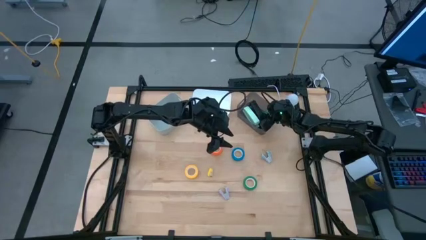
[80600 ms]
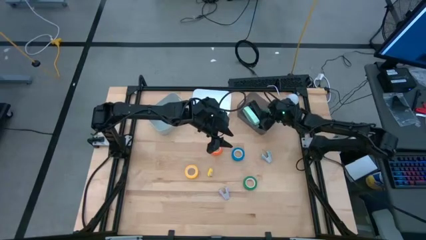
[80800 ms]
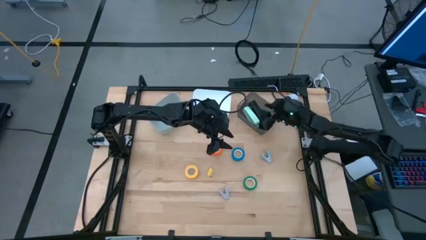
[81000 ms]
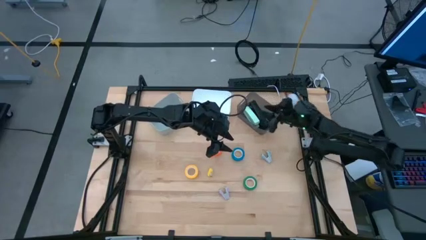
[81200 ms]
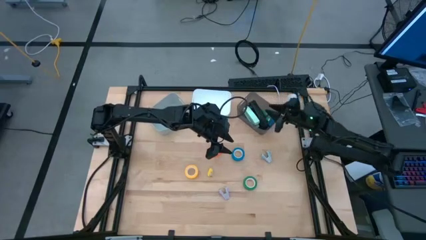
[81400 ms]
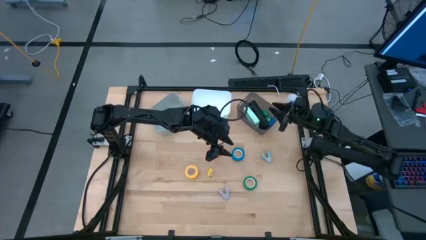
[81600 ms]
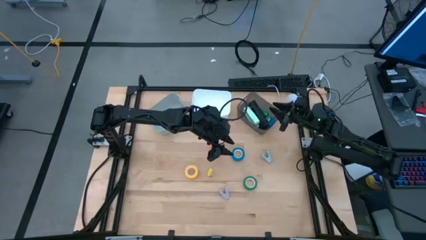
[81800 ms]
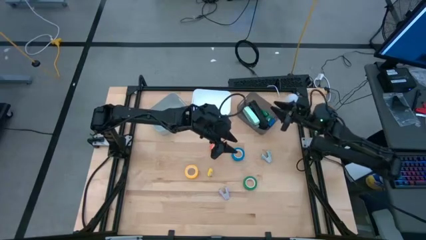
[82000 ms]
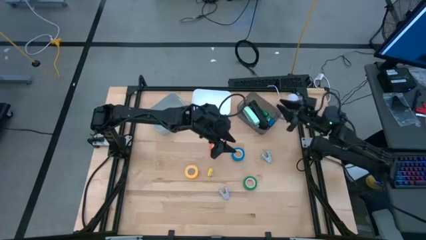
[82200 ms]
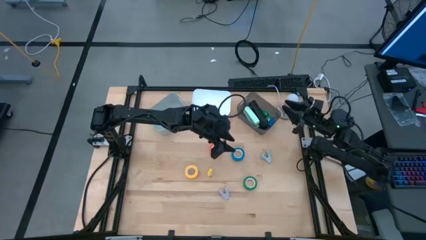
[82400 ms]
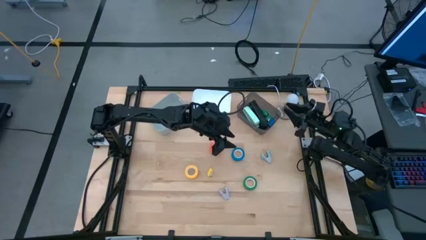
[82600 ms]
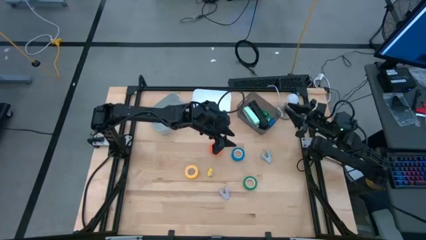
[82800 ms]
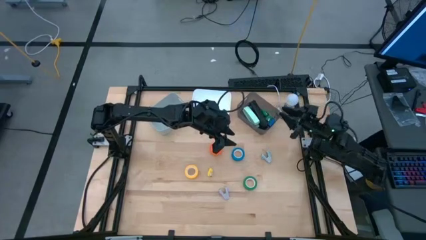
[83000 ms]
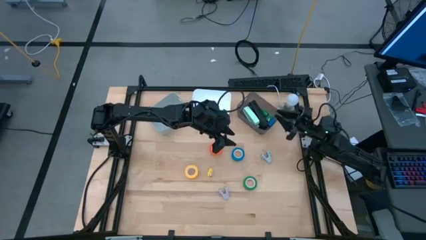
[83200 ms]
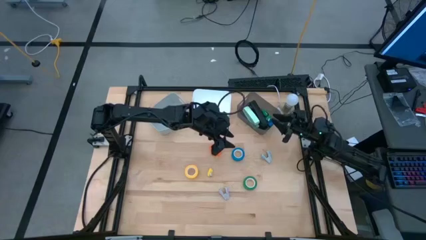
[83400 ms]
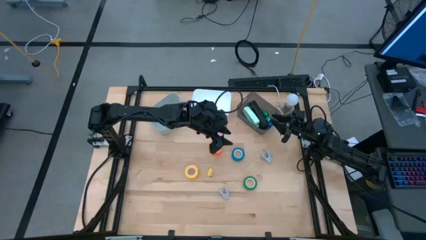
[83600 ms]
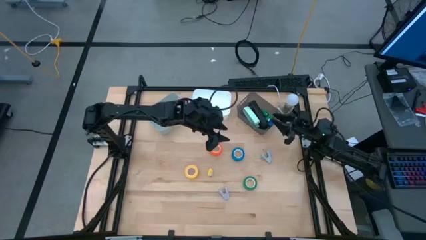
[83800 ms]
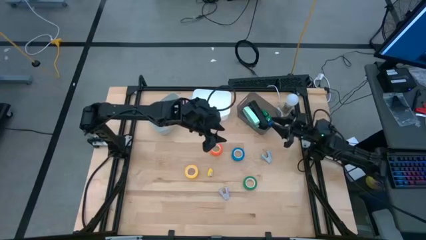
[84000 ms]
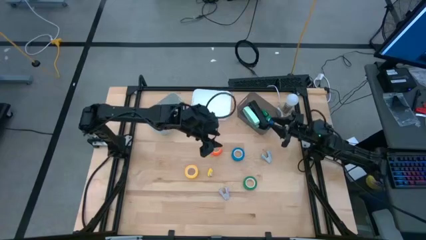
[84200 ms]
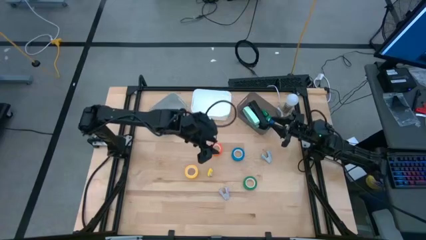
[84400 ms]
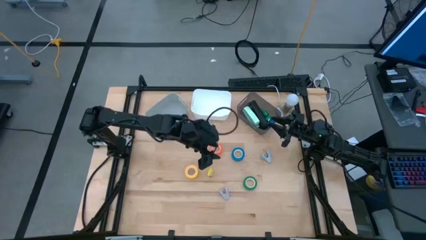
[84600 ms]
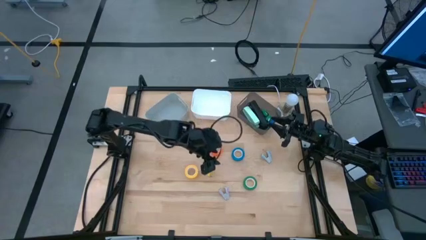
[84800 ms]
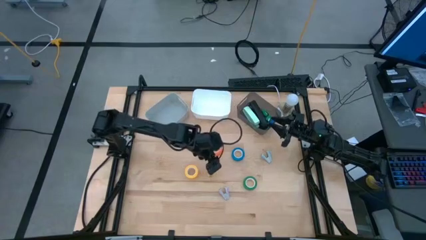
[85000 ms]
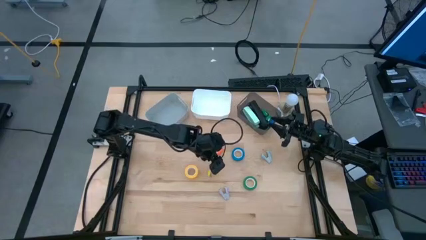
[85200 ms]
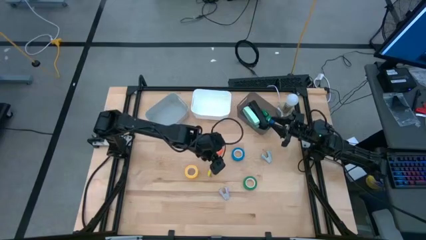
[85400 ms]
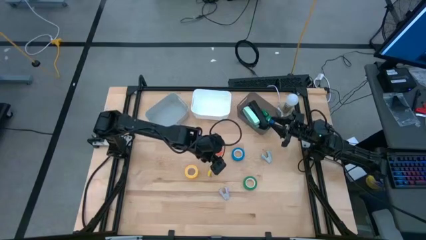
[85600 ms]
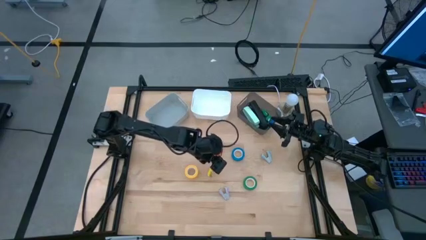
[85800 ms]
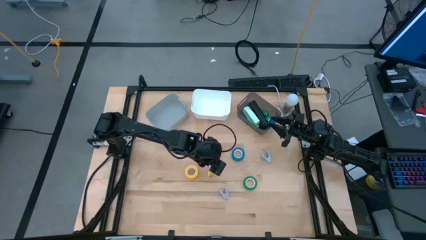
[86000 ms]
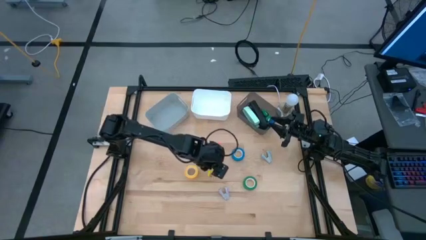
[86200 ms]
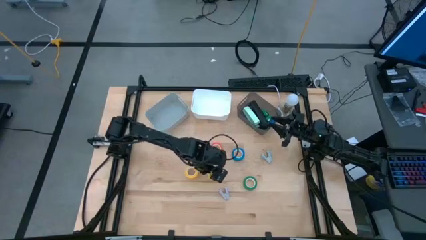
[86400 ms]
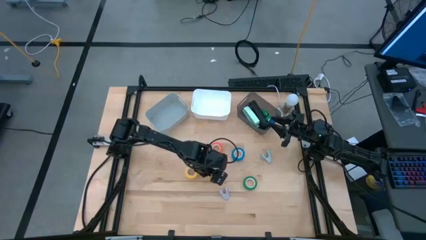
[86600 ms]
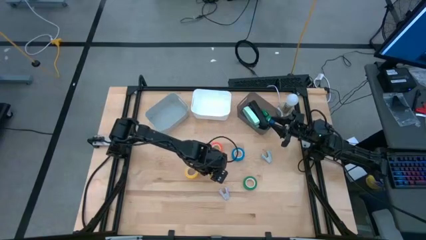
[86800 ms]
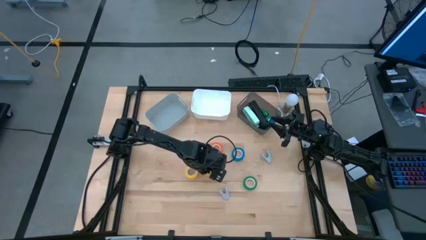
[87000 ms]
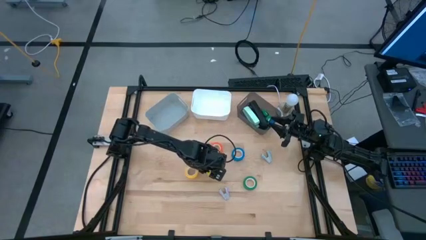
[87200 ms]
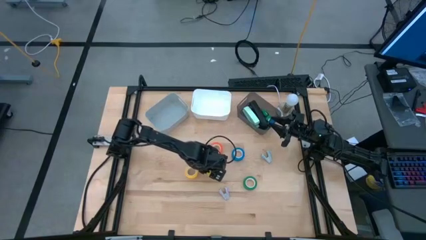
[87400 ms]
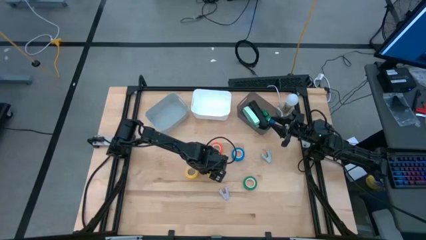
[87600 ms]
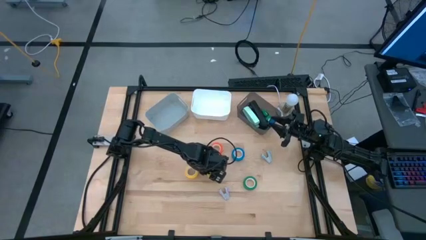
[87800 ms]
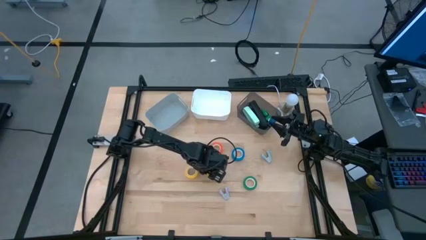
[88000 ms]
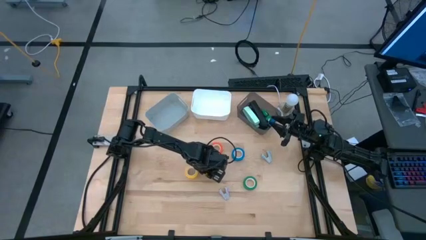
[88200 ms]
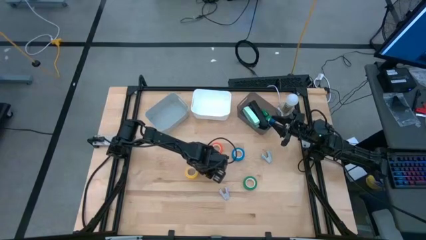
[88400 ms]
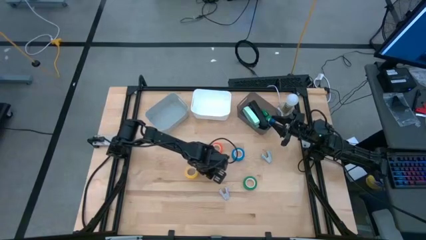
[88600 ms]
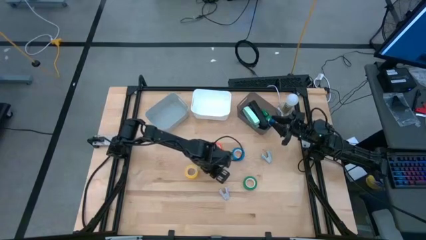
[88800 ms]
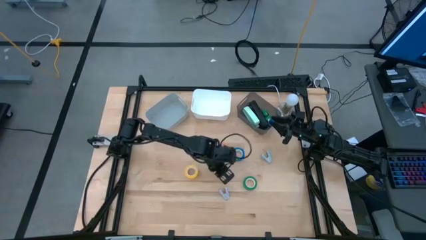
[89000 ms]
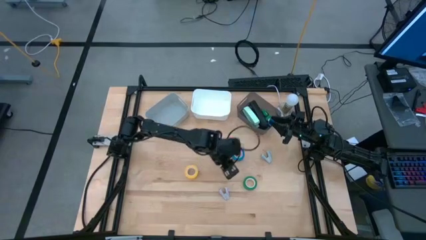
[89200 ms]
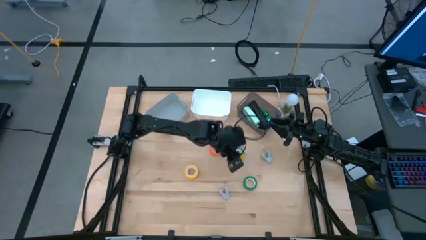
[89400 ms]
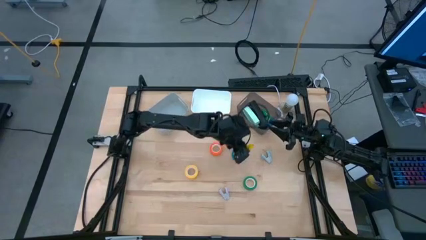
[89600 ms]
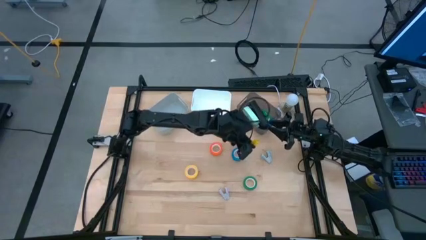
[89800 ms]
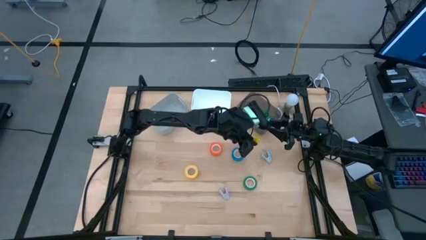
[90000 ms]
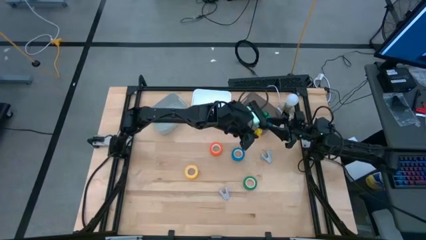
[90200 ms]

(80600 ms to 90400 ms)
Task: Pick and place Stapler, Stapler remover, tape
Put the small yellow stapler into the black bin

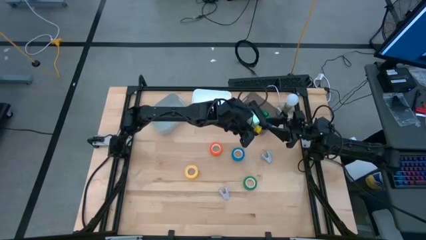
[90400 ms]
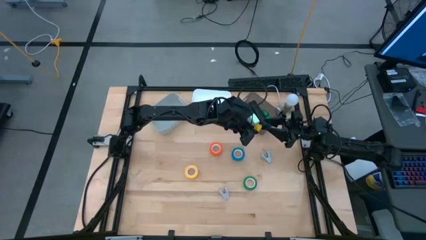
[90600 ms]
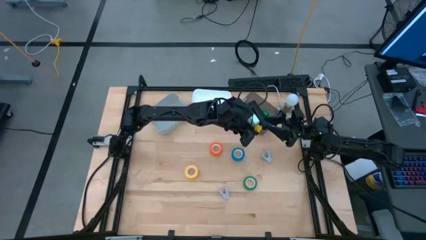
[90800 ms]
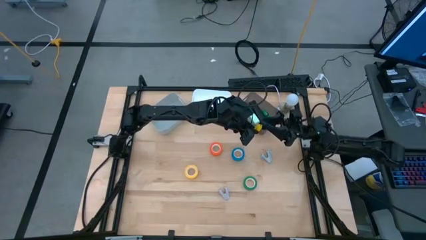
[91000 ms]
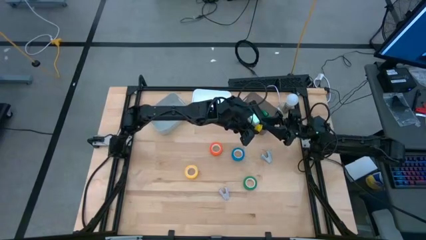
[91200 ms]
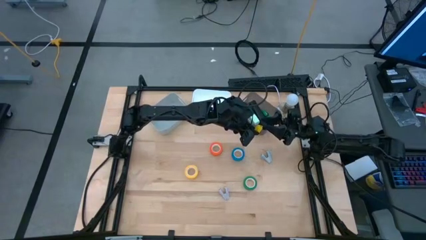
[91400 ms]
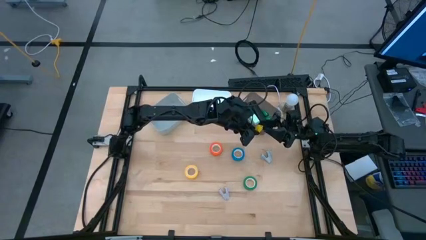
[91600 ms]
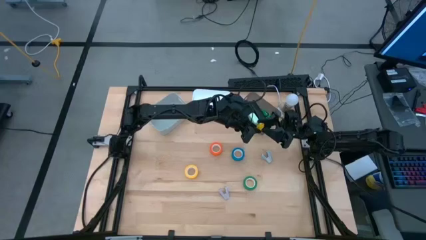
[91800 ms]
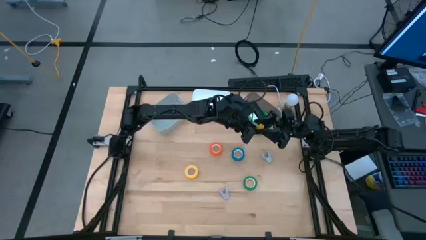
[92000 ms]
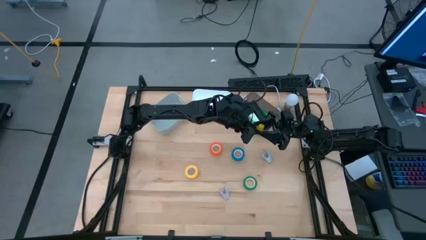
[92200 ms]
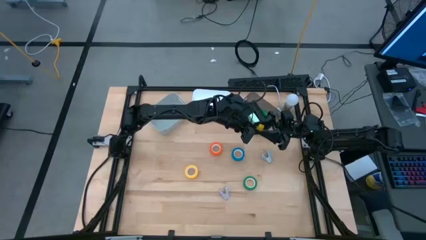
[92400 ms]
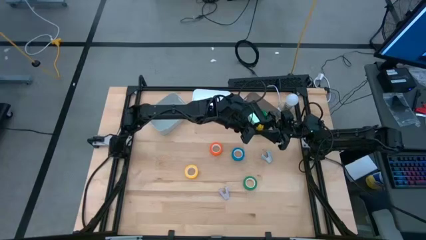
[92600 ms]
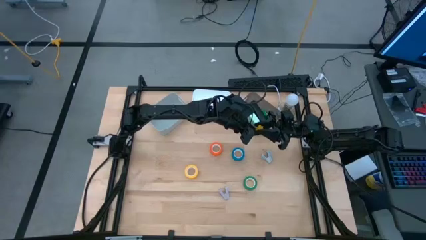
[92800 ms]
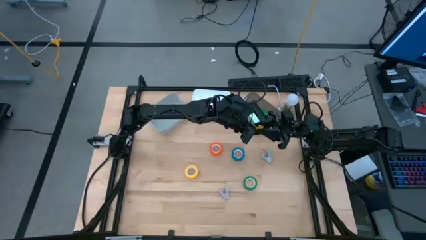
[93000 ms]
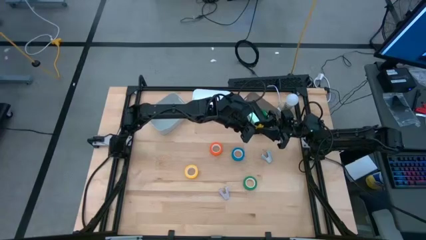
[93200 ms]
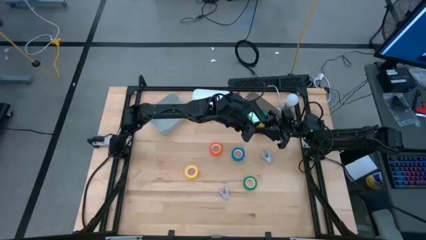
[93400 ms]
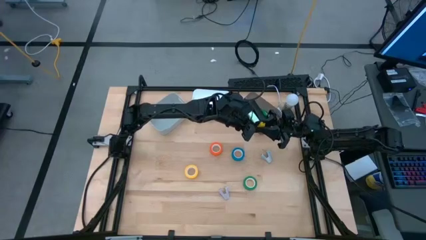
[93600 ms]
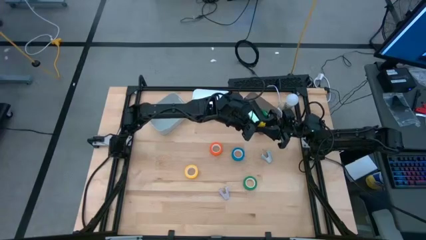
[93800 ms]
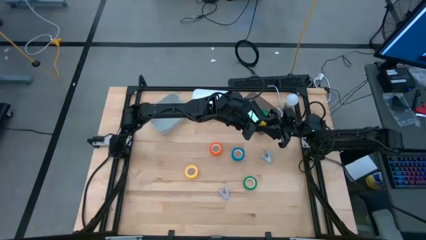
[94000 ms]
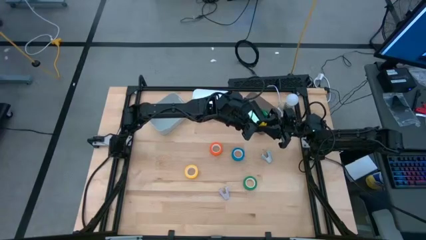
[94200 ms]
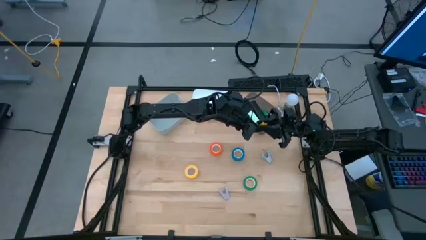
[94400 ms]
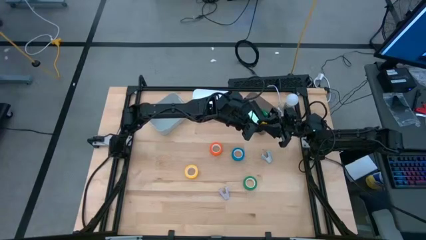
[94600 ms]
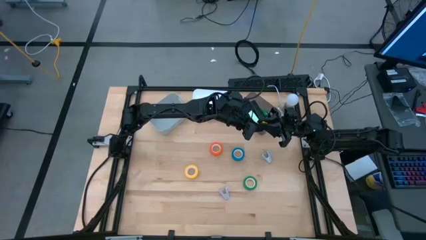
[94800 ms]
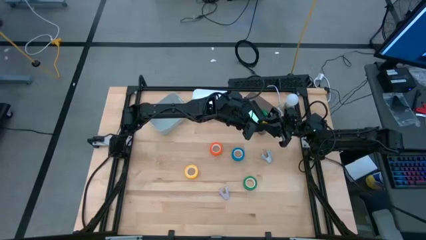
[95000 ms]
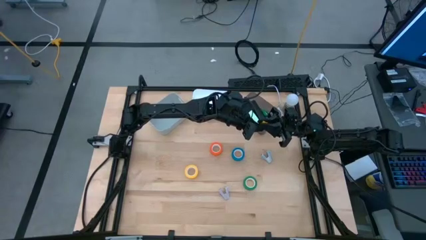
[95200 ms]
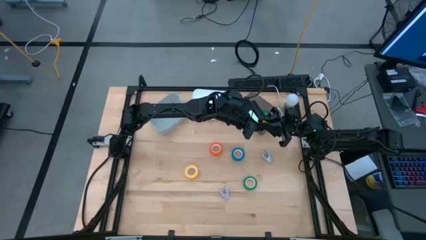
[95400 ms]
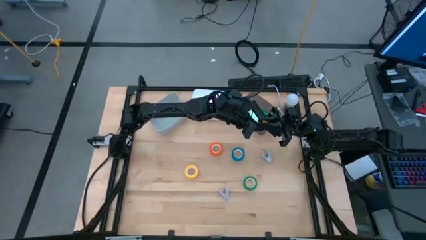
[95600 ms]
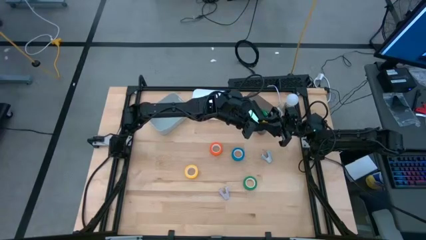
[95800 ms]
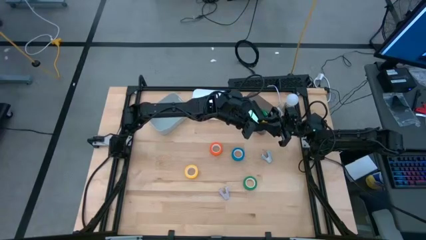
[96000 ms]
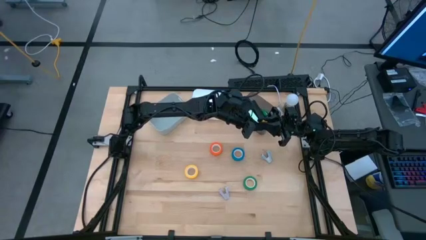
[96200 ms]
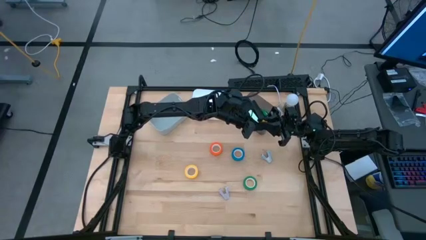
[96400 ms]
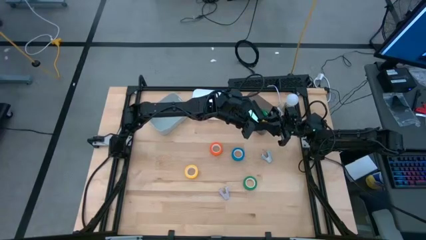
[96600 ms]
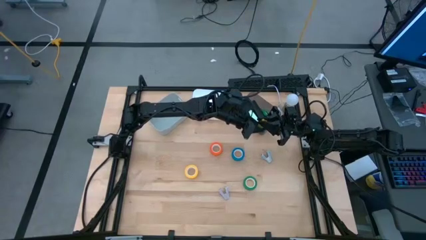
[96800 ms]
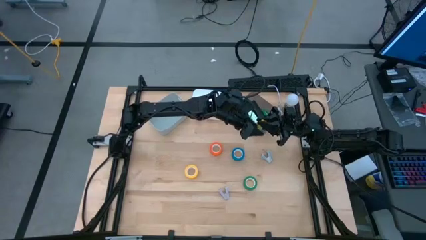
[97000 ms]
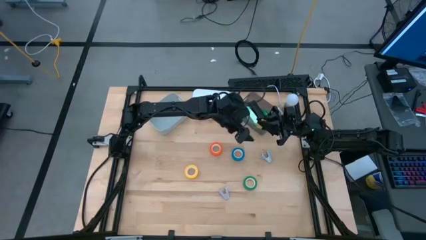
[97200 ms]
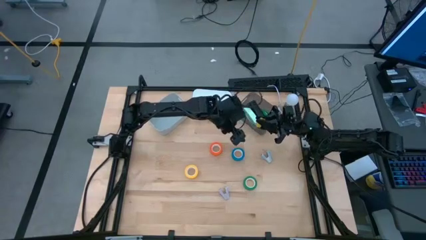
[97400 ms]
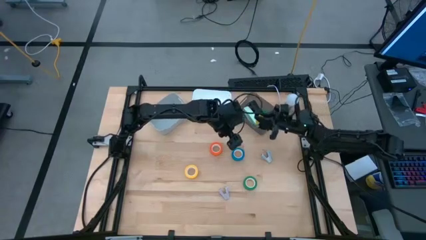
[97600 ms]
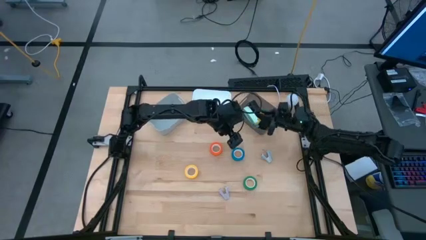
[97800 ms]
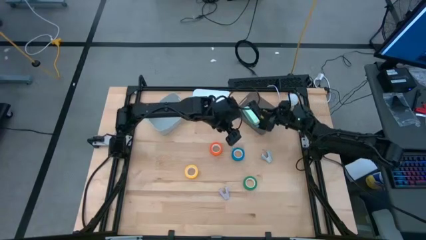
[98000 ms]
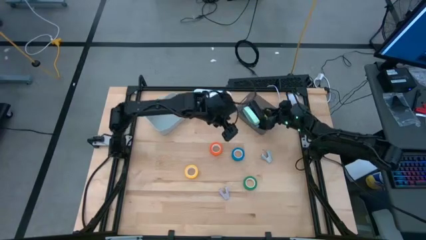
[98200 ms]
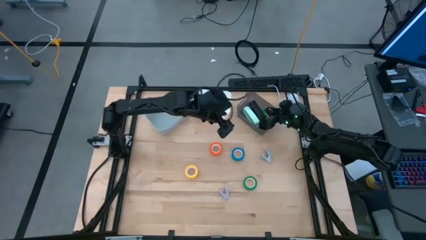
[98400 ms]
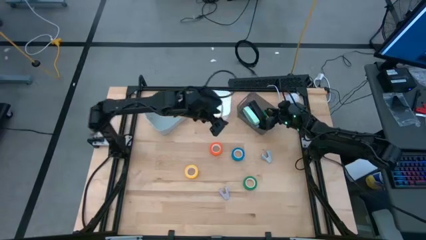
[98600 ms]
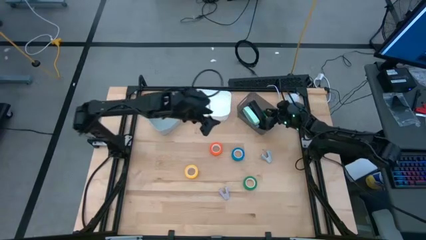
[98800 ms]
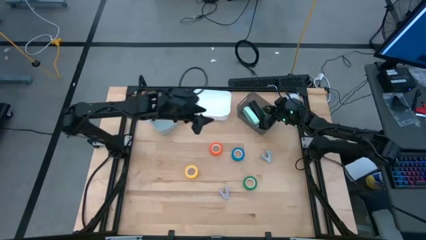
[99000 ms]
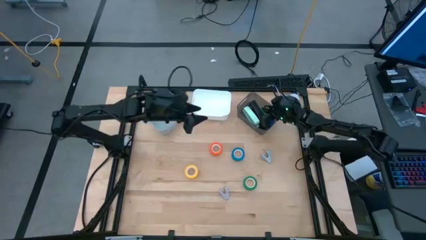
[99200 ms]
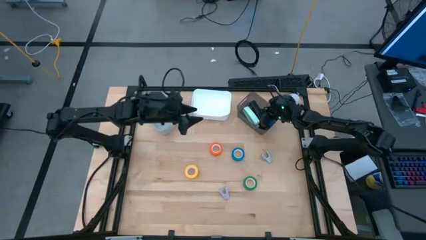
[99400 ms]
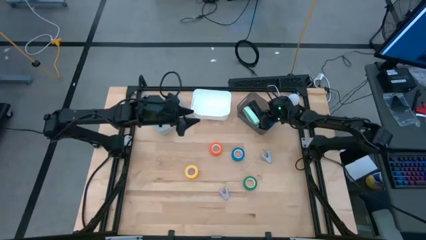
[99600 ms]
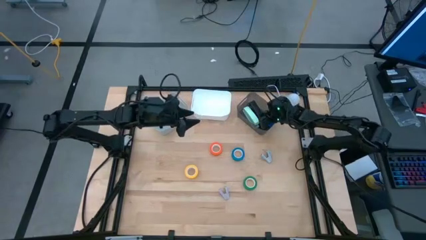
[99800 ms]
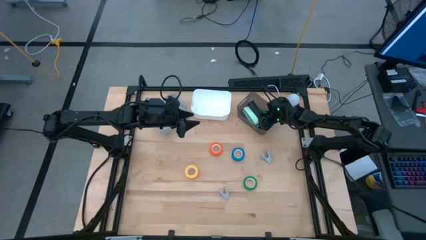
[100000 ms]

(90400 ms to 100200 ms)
Put the small yellow stapler into the black bin
